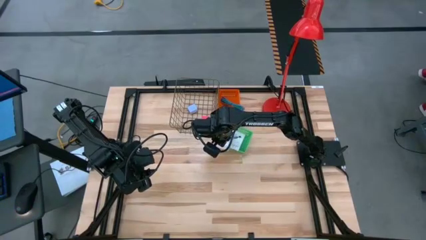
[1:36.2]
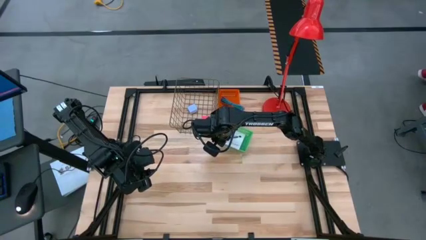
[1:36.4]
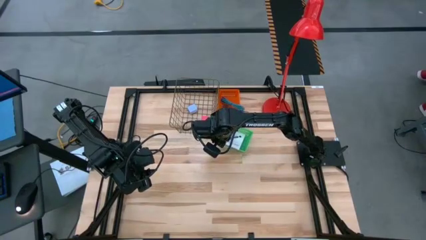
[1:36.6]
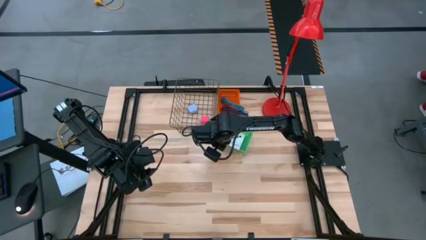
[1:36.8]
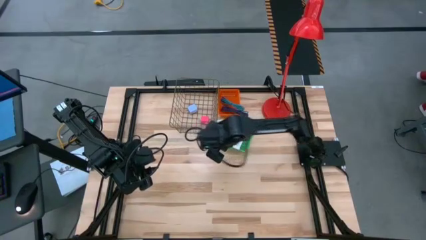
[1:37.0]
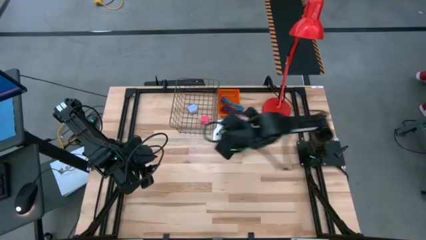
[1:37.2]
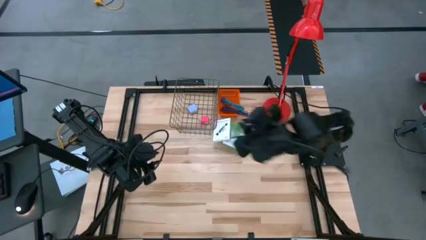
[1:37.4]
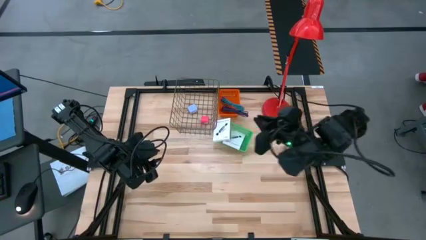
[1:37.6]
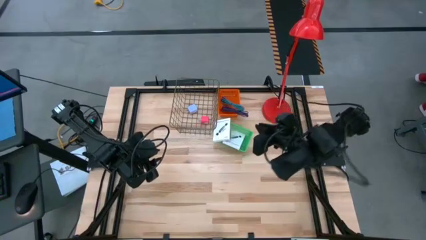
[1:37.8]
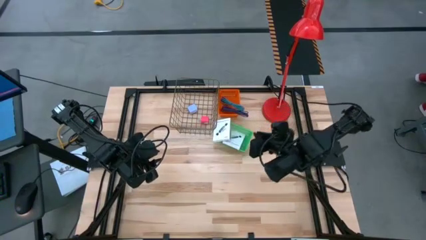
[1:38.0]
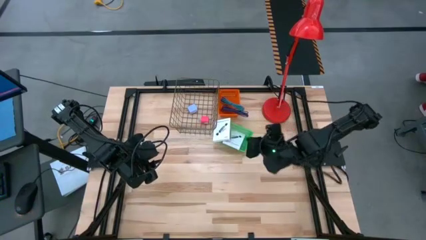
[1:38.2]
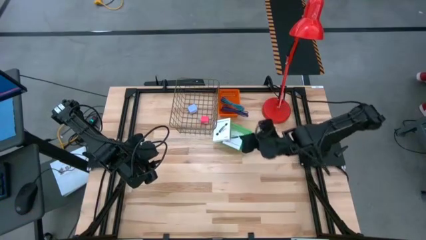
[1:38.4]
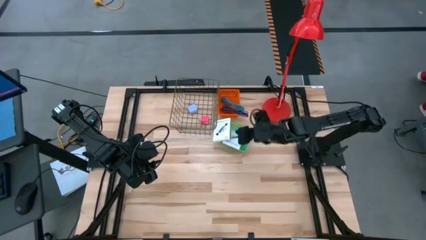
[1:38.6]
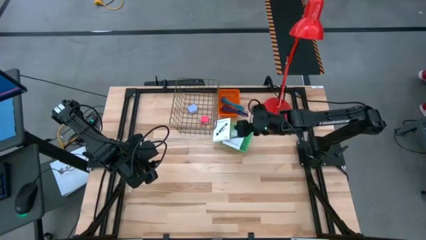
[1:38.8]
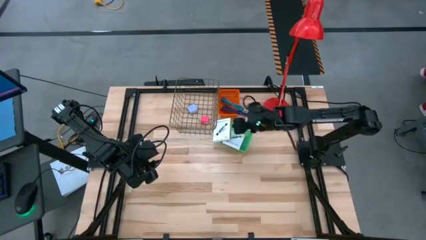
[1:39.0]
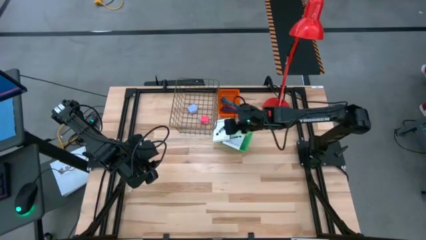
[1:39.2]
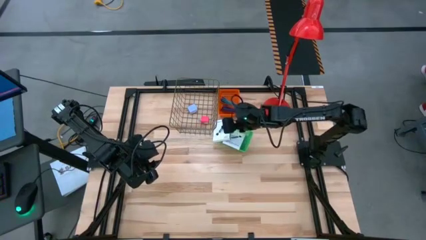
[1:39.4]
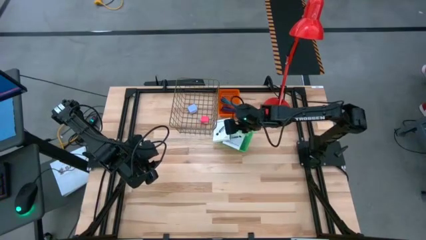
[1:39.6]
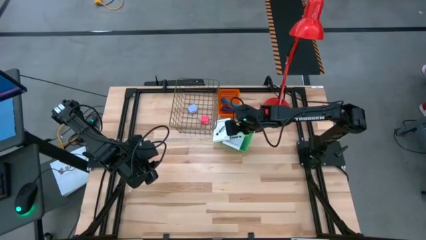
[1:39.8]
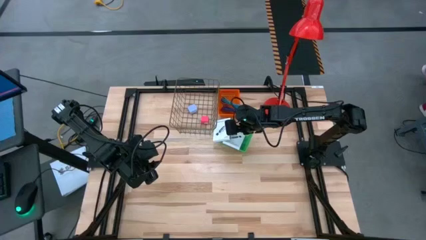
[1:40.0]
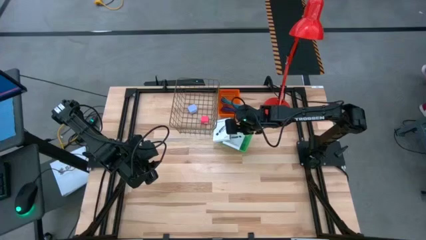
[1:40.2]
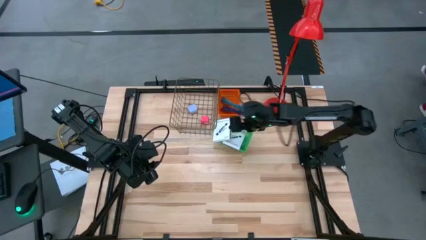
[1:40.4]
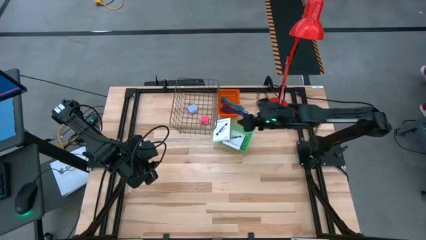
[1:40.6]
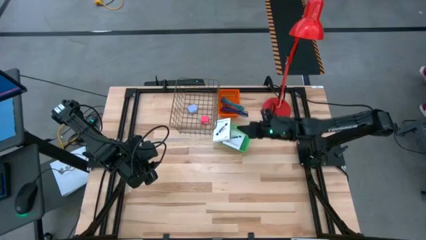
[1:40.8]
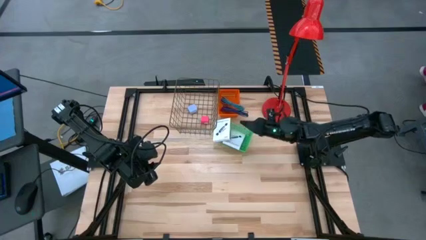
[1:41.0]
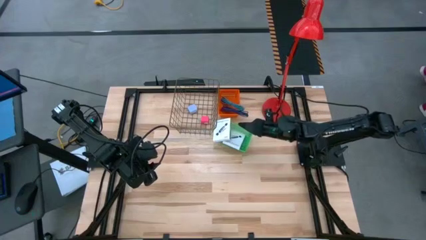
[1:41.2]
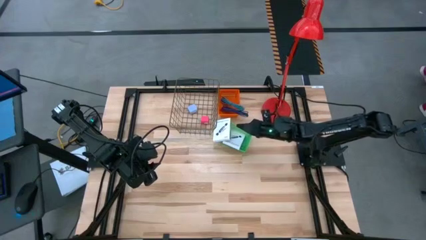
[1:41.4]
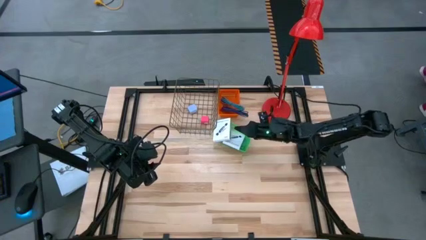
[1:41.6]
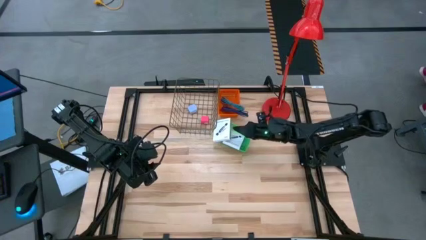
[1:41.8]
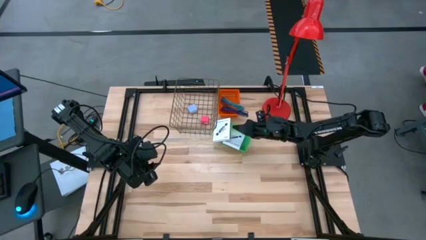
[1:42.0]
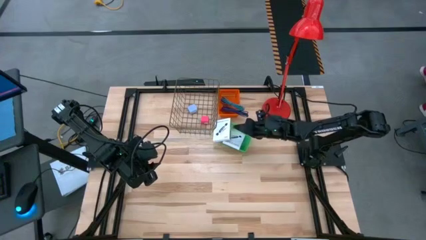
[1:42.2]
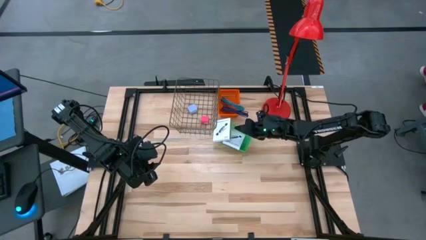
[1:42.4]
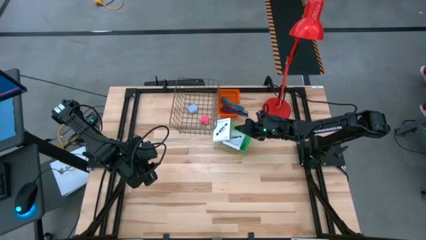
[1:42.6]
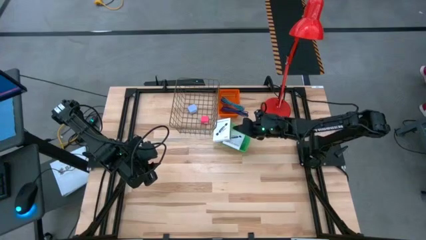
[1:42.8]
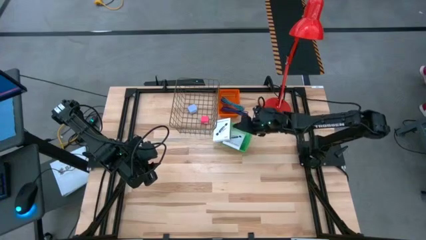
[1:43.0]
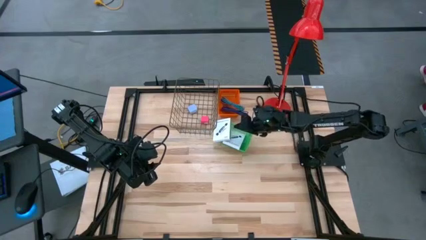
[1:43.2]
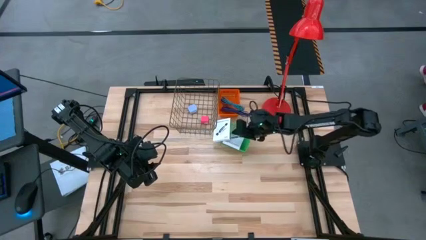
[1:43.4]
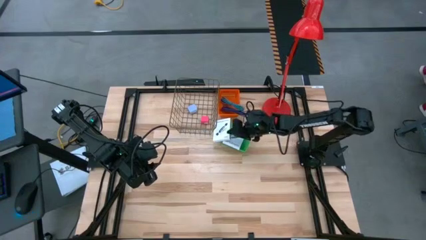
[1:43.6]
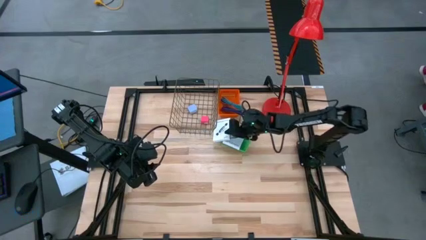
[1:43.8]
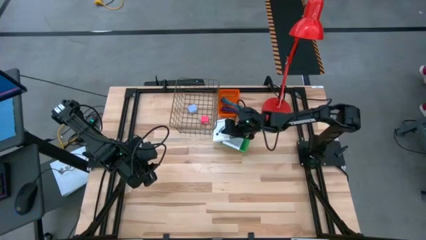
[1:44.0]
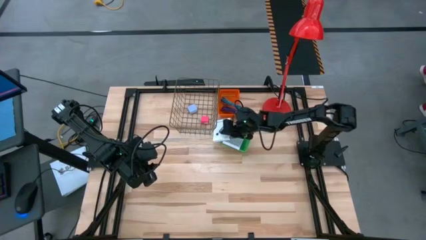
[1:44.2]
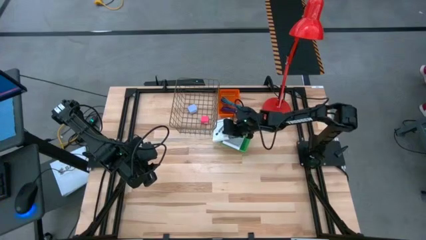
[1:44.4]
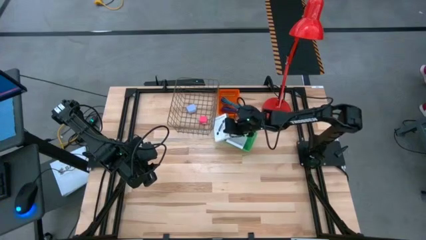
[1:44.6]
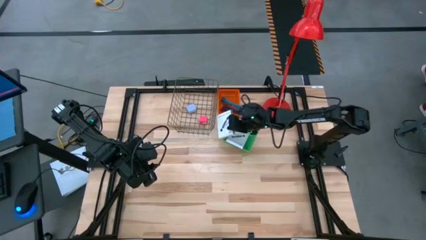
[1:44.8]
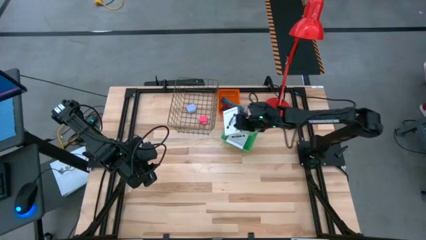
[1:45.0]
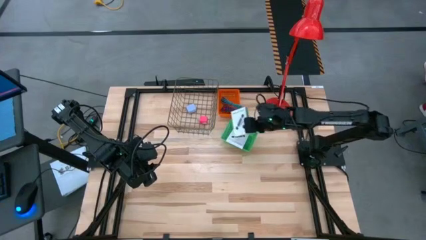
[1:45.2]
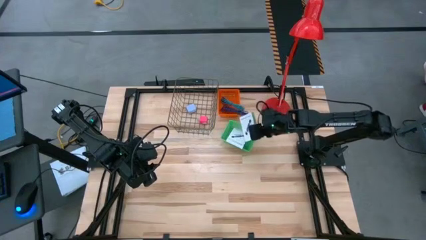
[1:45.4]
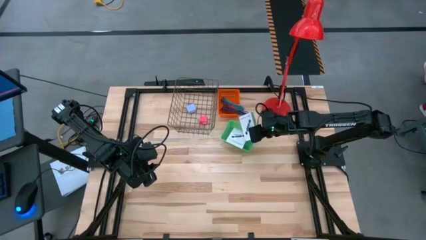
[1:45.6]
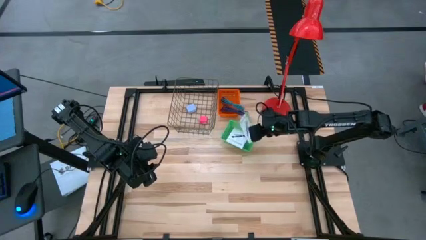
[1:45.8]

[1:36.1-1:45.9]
Task: Pick and place items into bin
Put the card reader box into the green basket

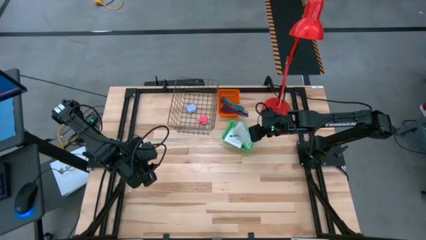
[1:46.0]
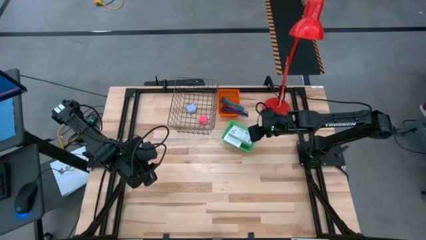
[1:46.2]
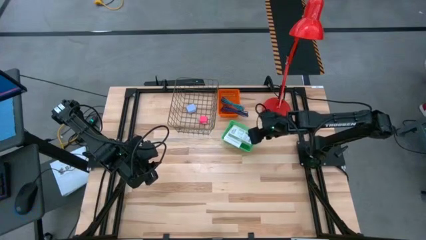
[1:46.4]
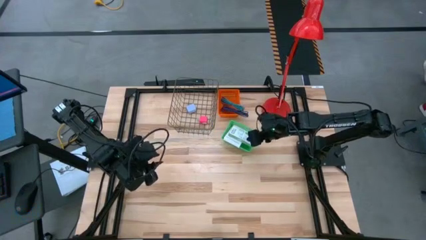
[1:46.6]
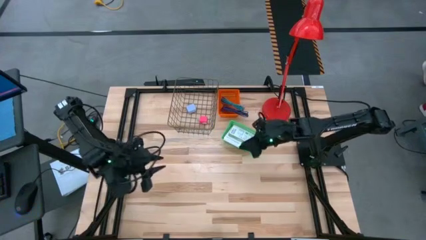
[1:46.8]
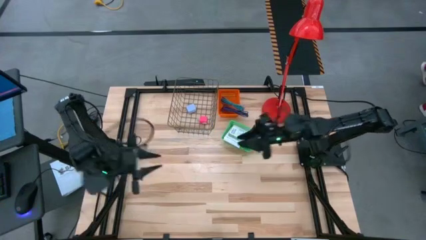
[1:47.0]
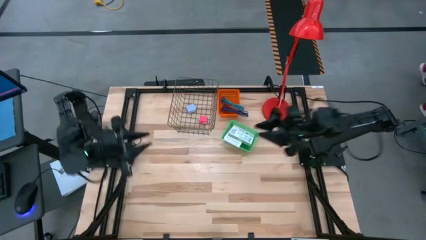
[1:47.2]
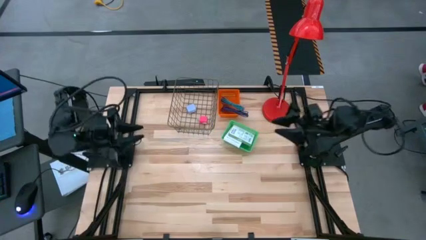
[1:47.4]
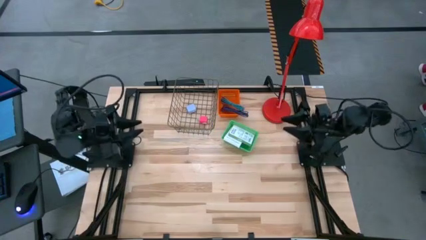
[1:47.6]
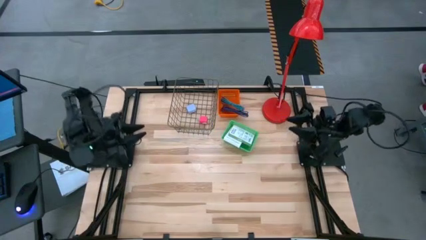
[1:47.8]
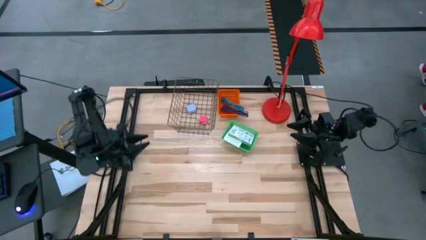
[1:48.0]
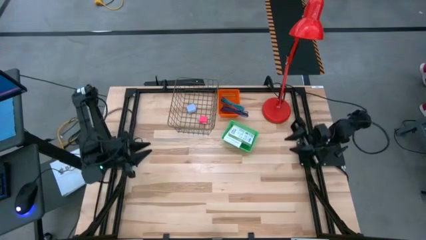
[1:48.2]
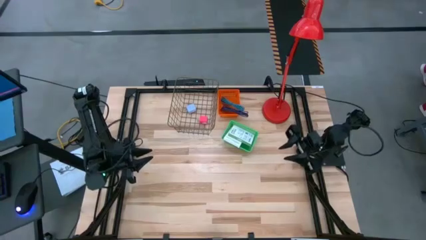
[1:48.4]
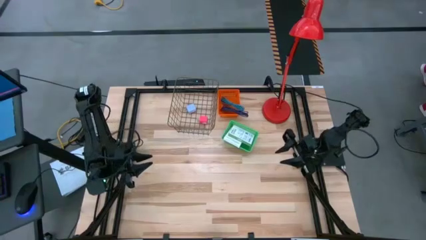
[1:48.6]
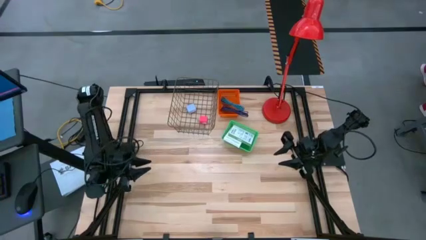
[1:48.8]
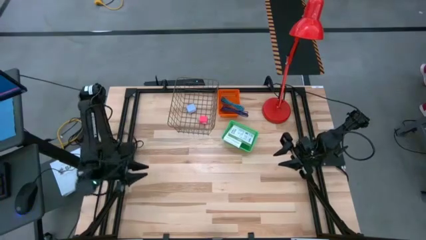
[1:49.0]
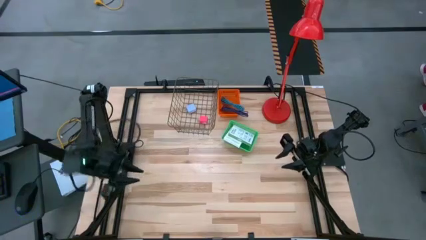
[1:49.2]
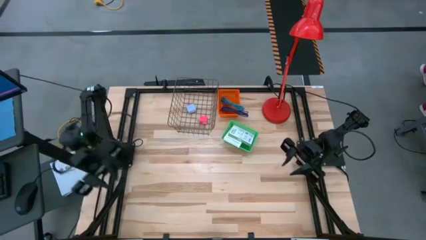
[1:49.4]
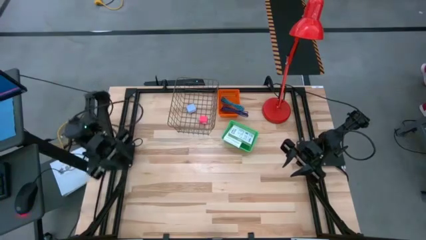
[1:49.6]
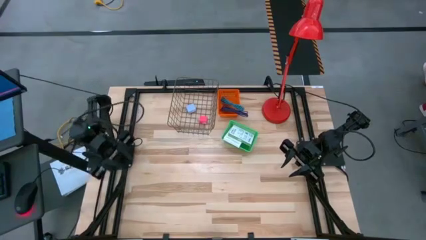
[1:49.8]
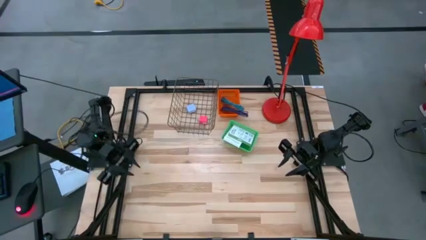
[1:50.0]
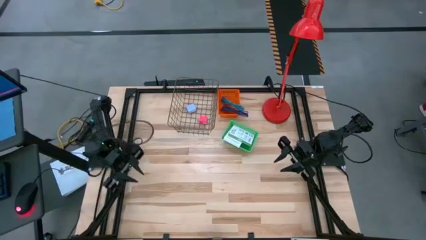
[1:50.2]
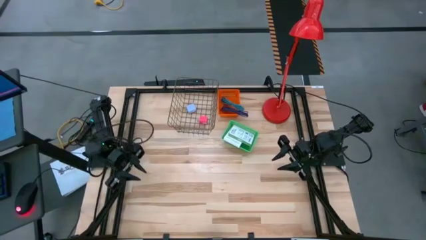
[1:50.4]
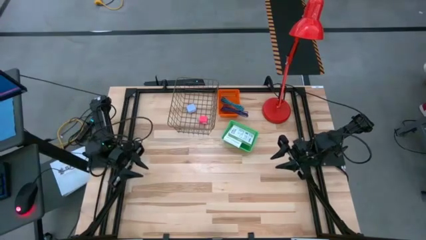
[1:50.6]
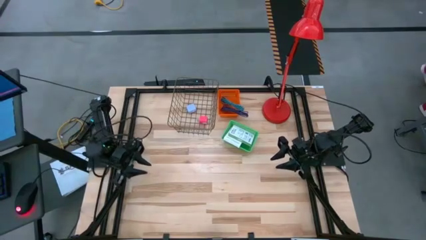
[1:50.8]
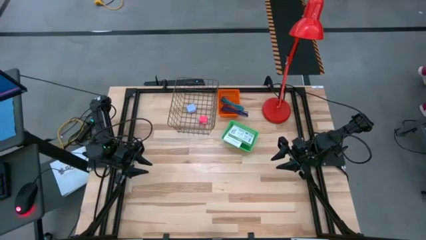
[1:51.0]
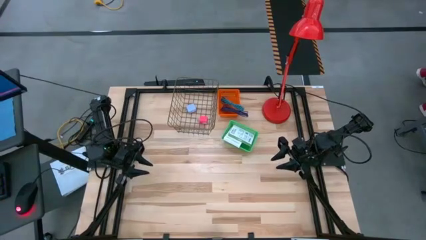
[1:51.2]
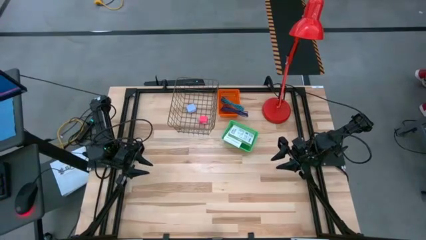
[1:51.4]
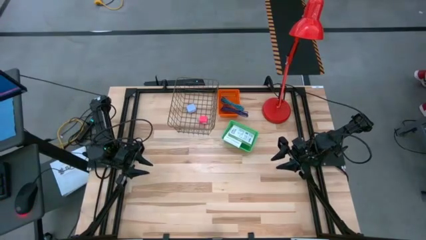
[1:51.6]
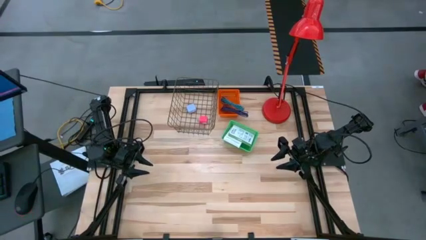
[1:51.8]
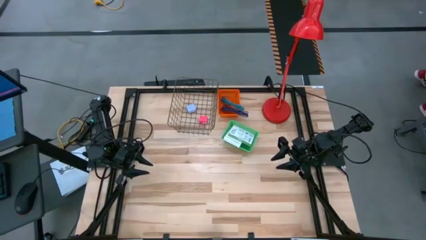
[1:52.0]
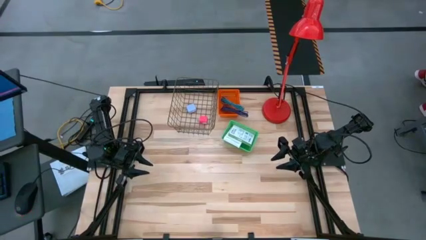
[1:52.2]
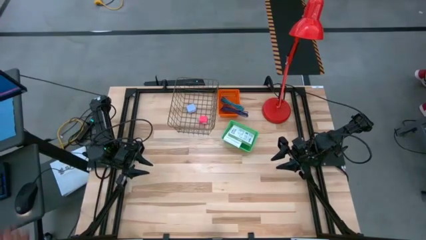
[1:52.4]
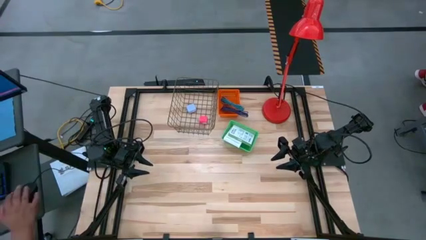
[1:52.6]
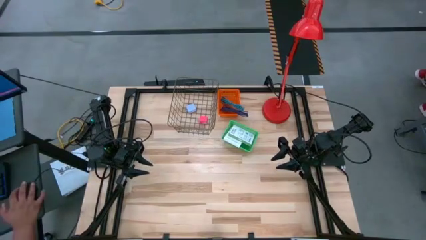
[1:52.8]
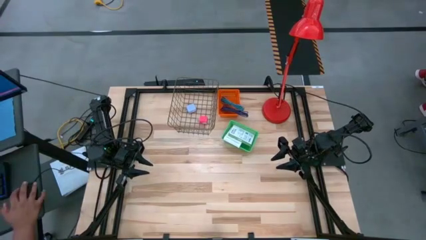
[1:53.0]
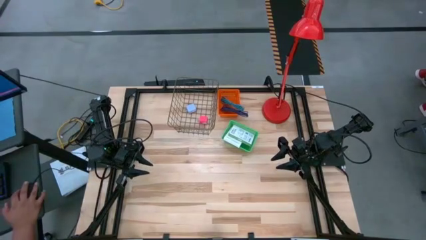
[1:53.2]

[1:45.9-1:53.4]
Return to Home Position
